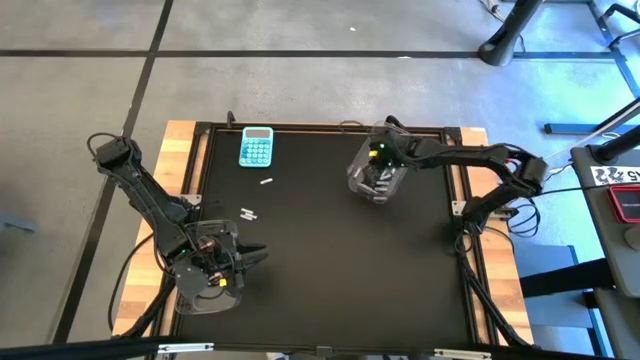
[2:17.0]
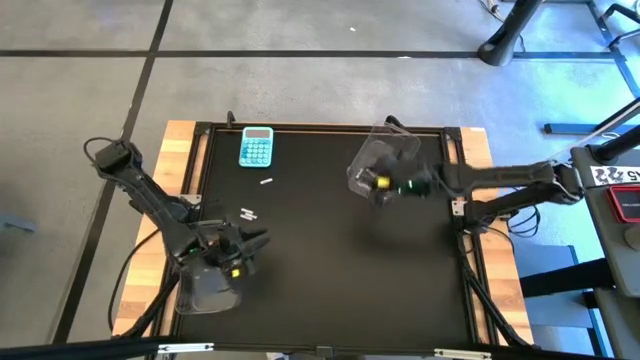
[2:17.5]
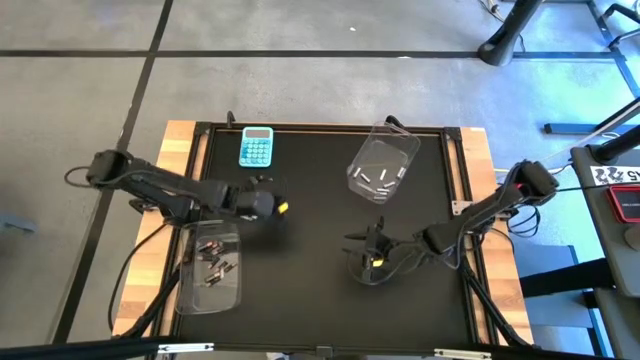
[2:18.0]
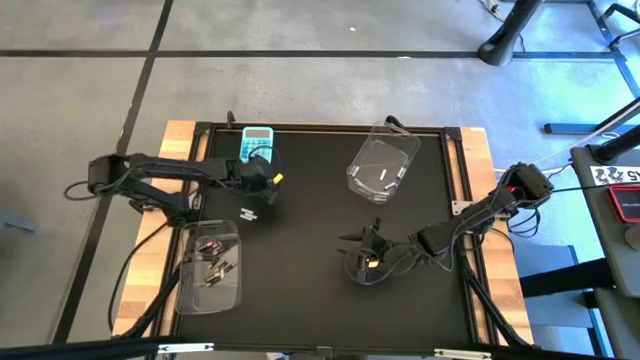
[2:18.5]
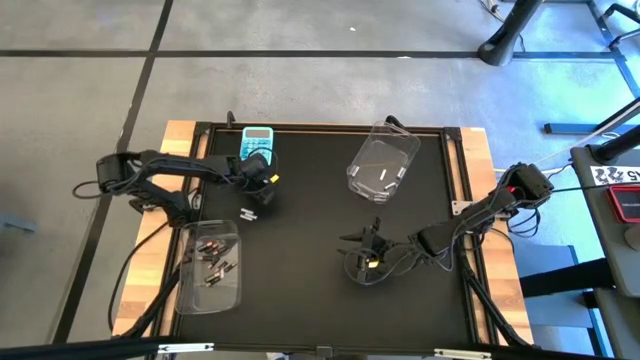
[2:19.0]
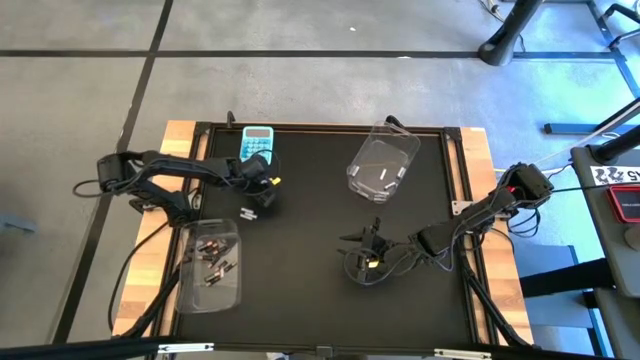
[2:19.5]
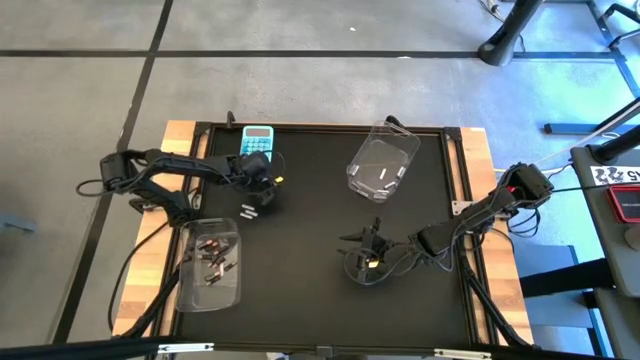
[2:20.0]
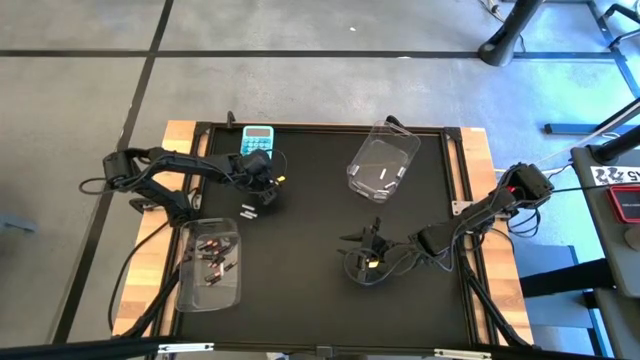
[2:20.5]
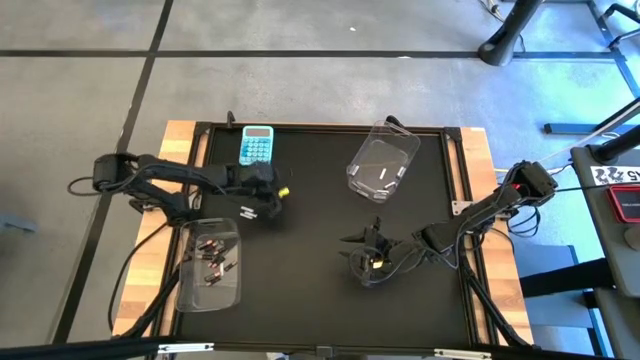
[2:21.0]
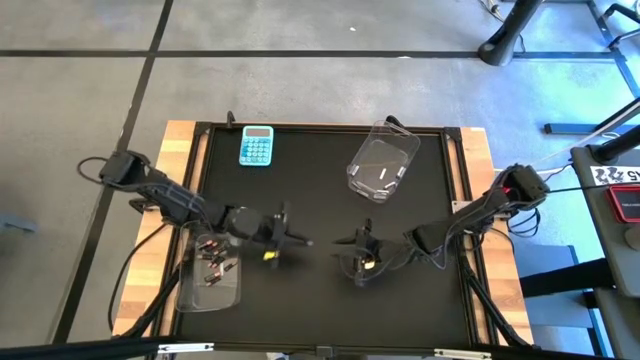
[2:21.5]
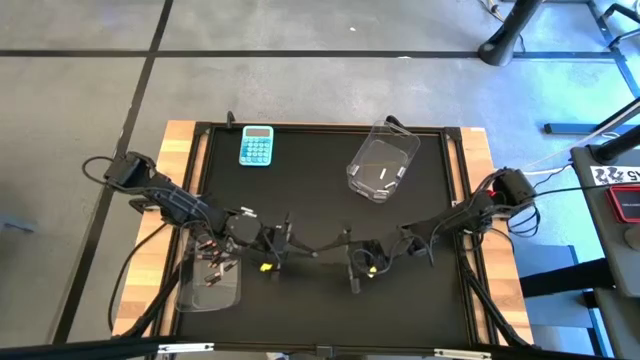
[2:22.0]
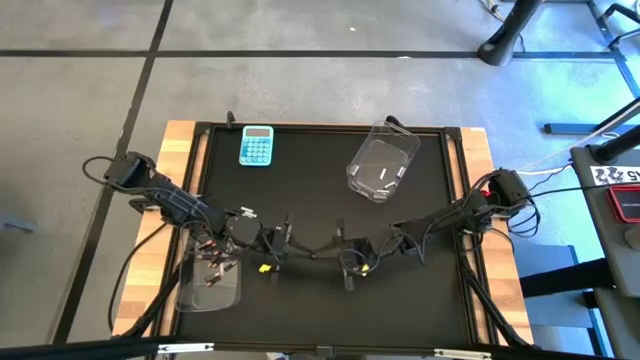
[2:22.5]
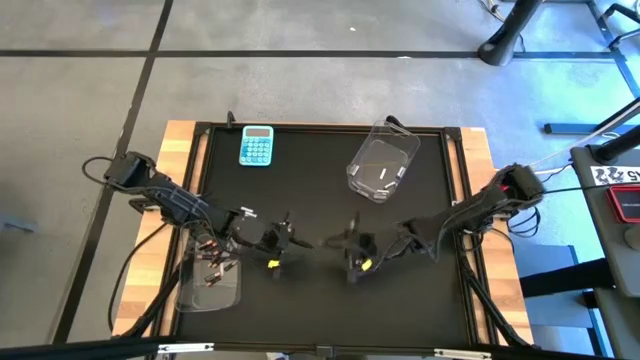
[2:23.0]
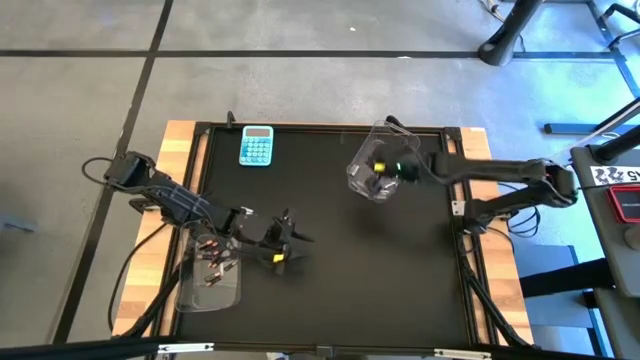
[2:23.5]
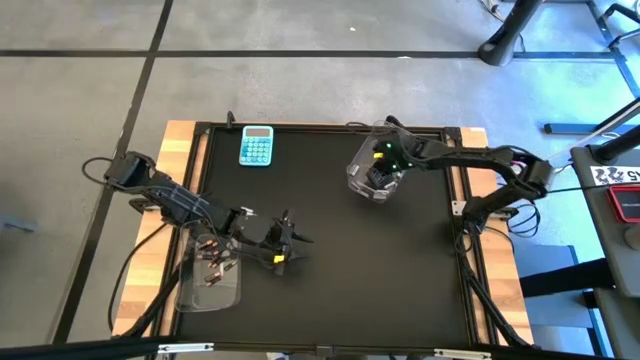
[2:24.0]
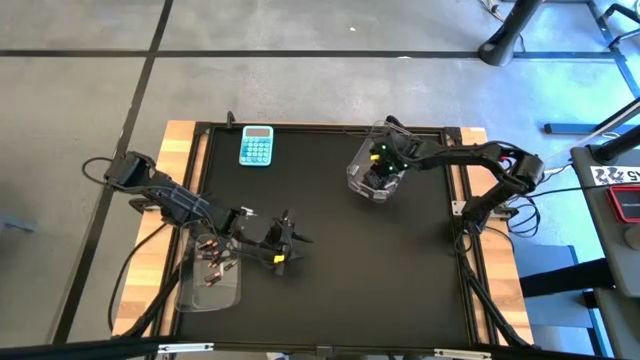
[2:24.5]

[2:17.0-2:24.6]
Task: Sort batteries
Put the white battery into the top transparent bin

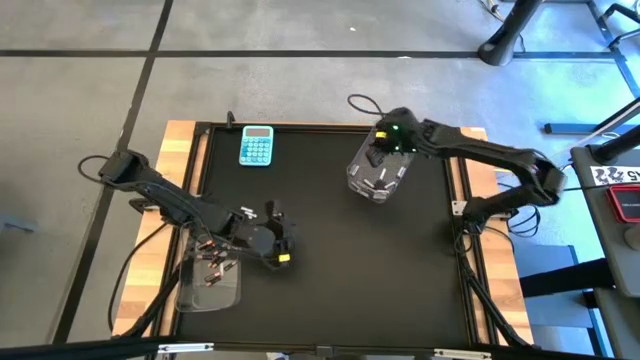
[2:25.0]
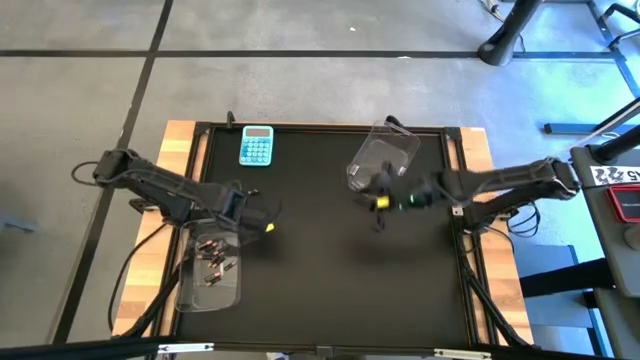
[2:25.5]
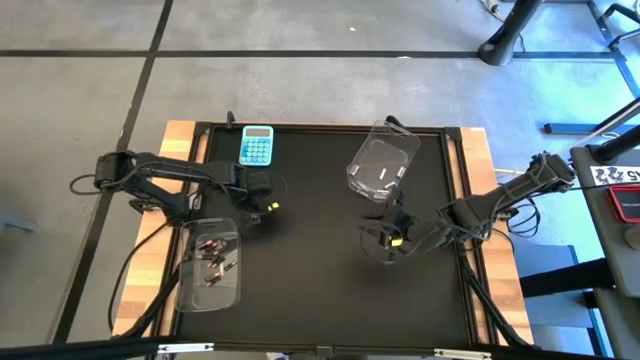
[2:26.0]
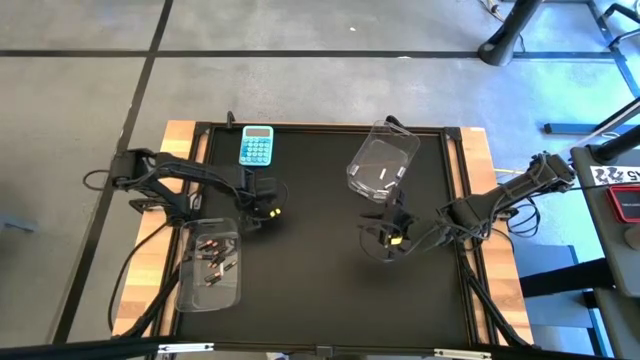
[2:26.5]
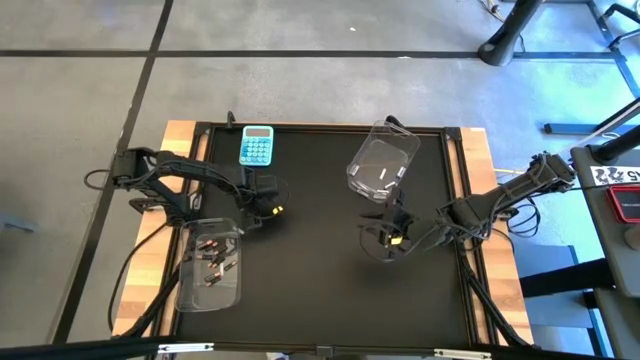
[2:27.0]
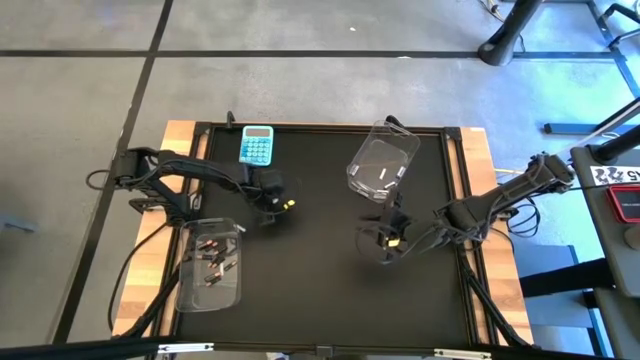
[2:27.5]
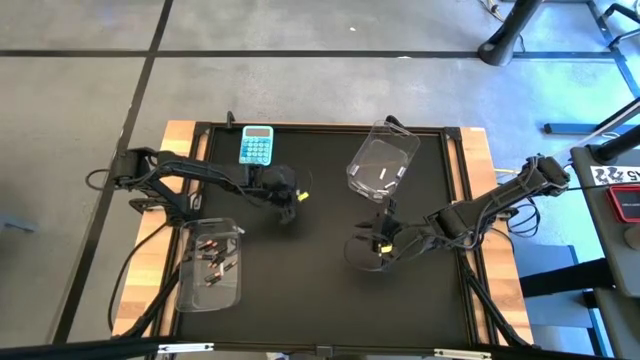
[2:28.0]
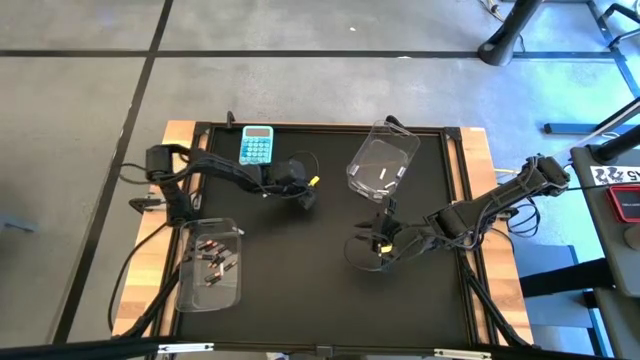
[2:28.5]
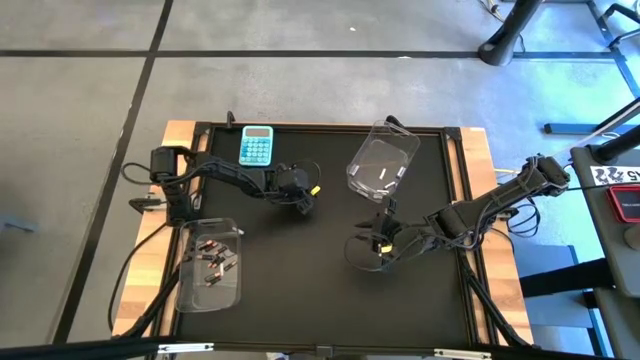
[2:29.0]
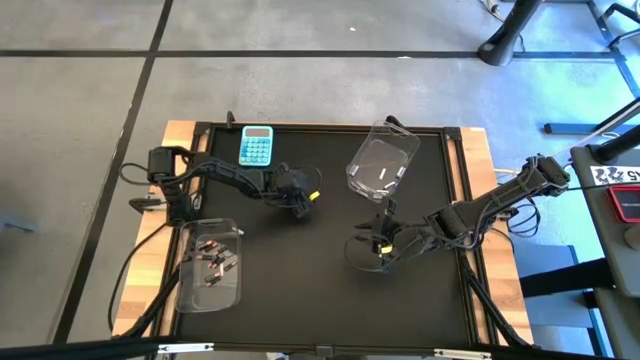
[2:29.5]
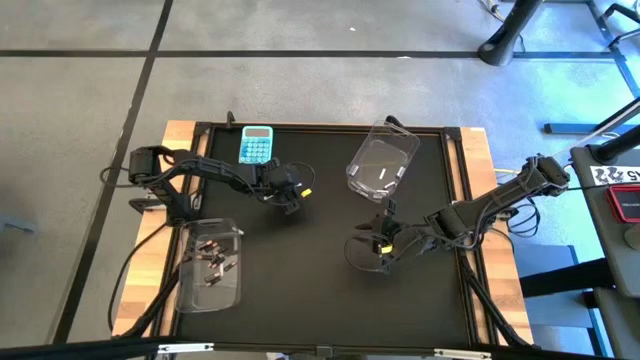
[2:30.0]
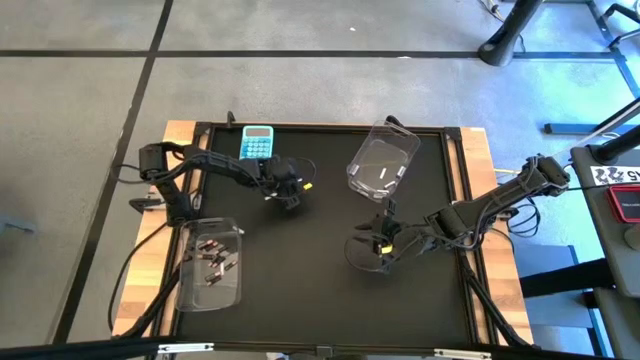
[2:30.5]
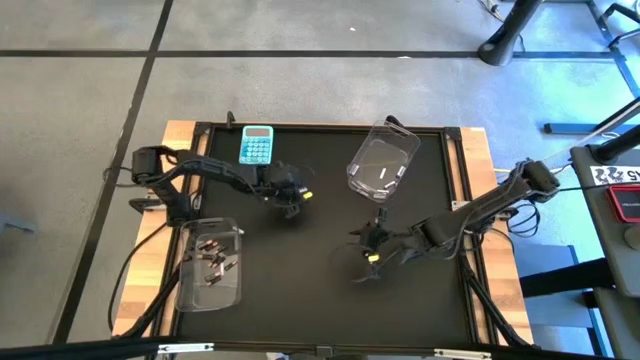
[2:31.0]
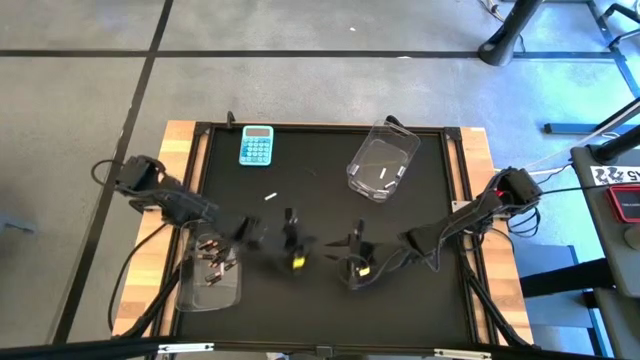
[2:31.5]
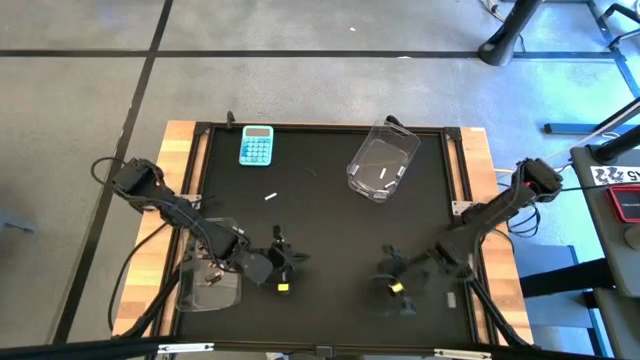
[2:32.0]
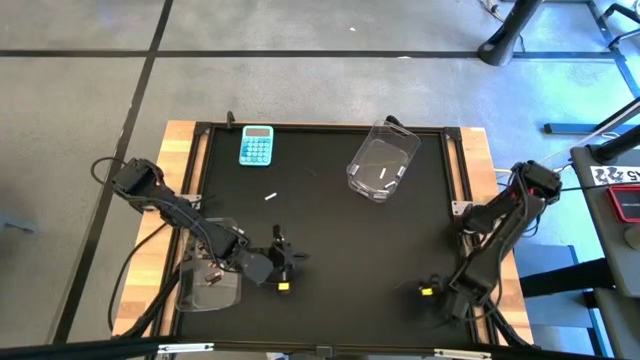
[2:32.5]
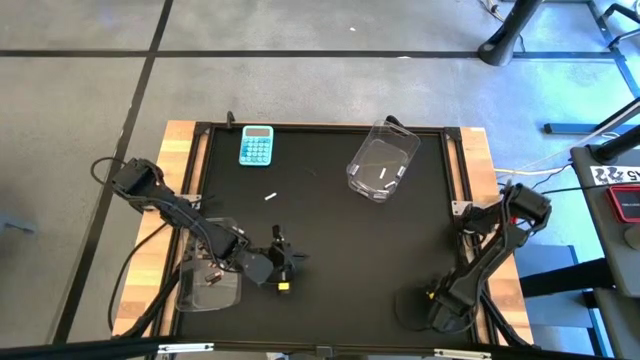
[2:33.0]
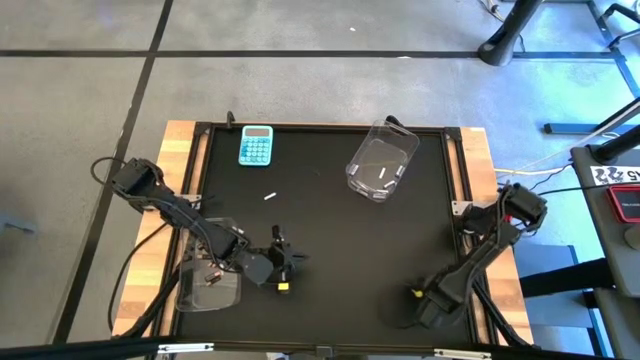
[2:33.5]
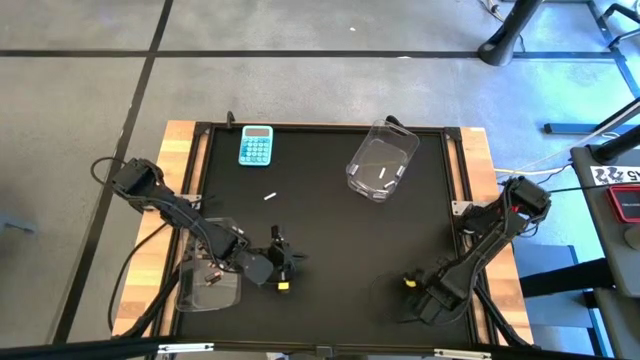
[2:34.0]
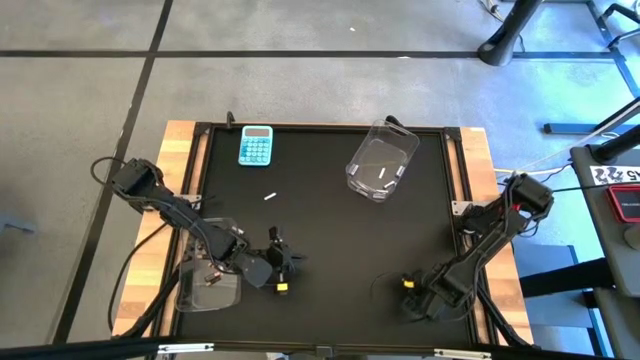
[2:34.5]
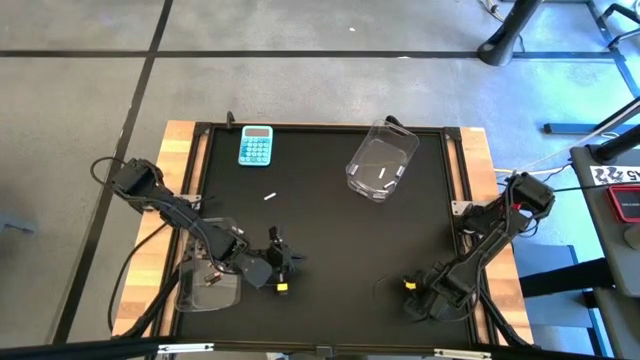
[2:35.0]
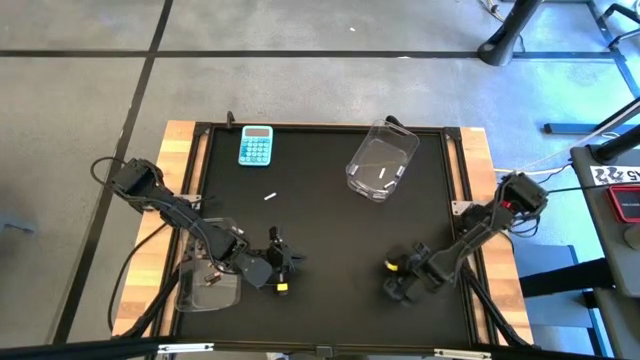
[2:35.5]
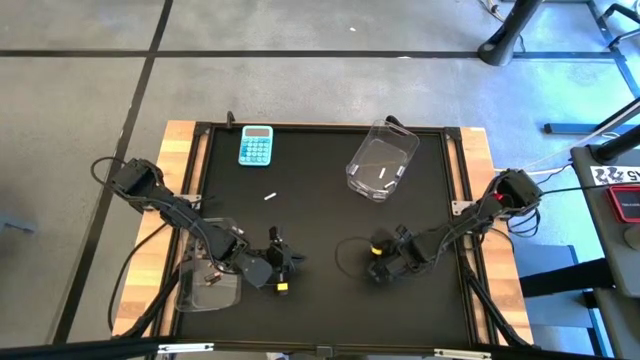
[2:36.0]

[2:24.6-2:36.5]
Put the white battery into the top transparent bin

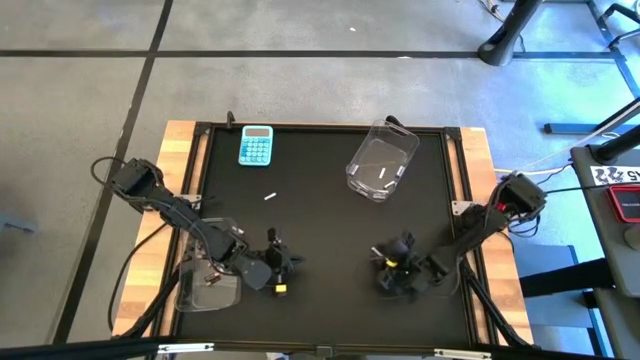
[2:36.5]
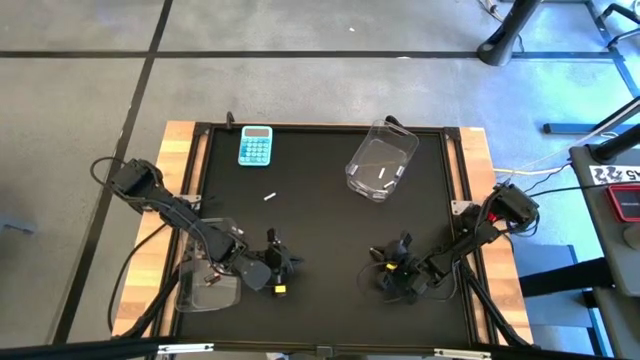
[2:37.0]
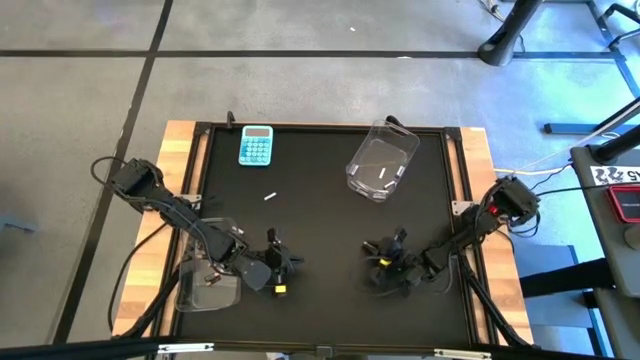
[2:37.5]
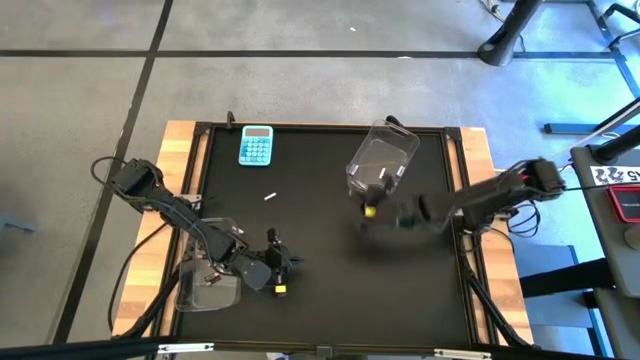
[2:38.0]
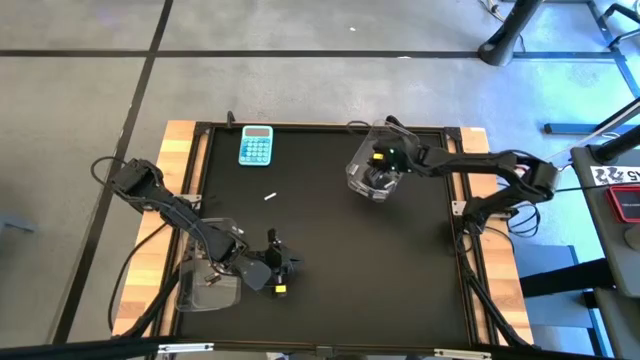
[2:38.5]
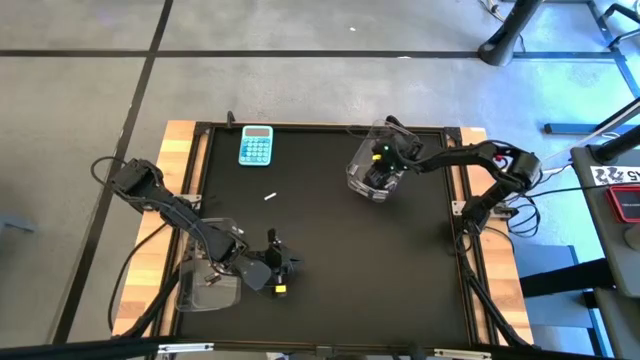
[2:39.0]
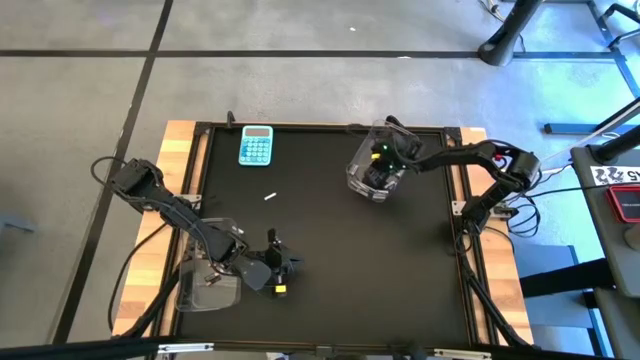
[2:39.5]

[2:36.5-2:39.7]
Put the white battery into the top transparent bin
